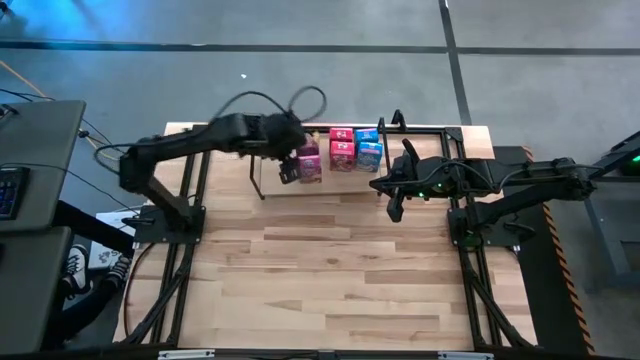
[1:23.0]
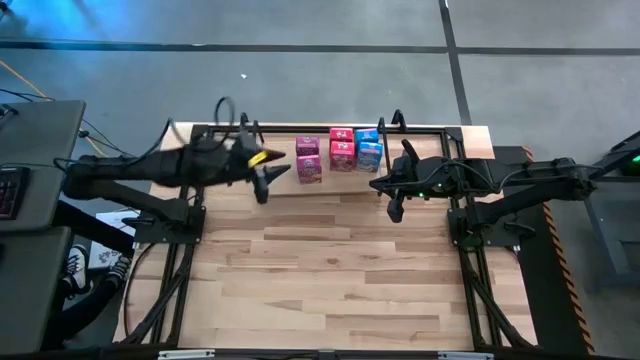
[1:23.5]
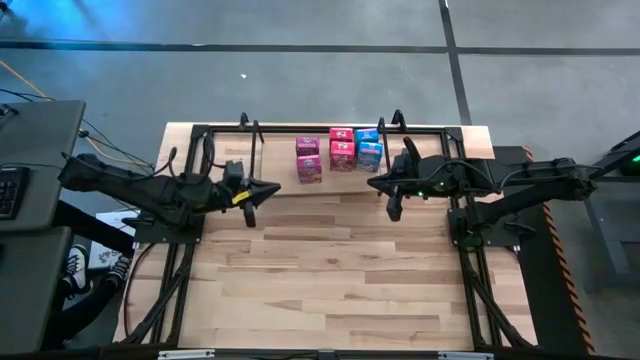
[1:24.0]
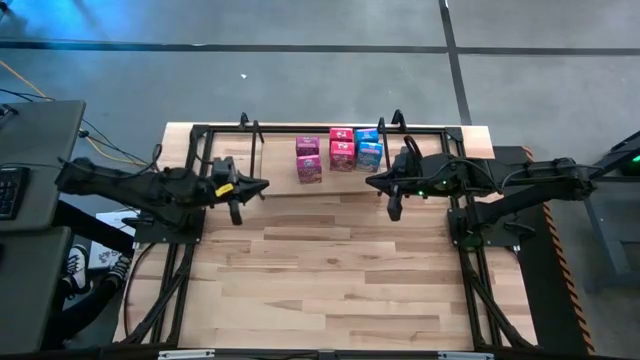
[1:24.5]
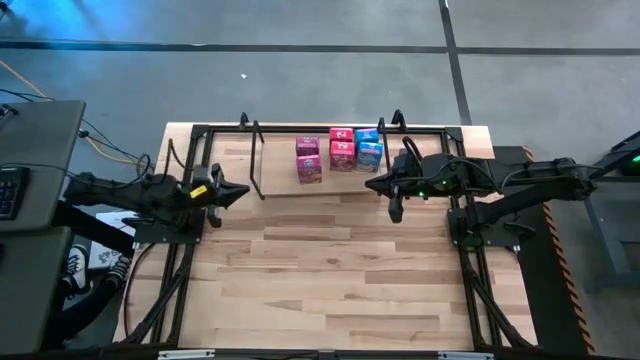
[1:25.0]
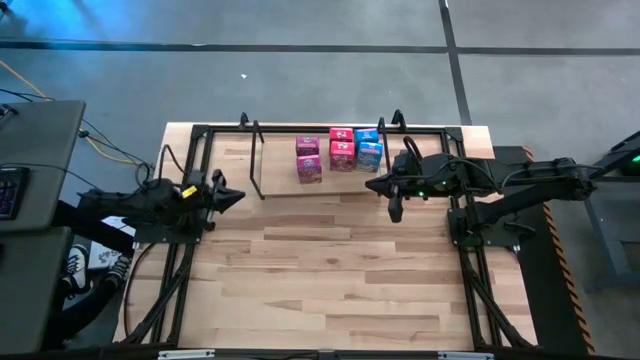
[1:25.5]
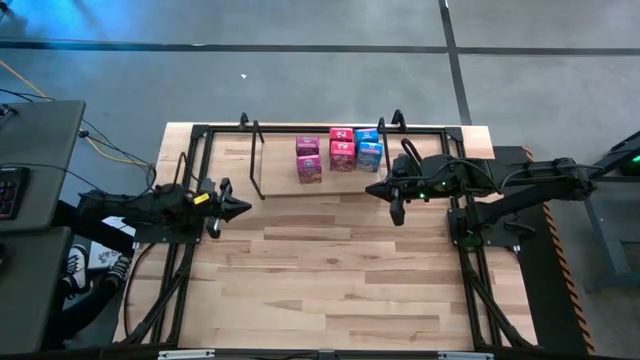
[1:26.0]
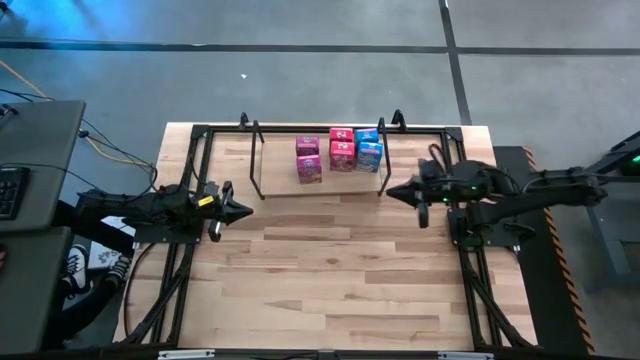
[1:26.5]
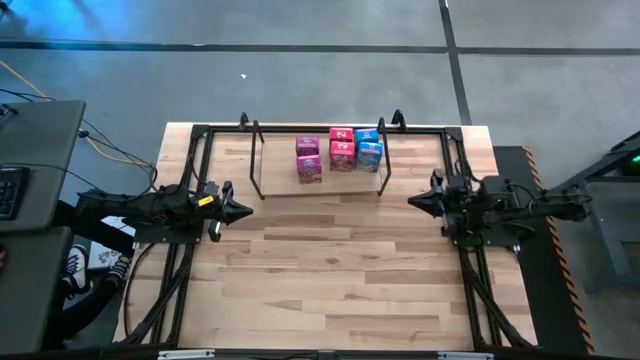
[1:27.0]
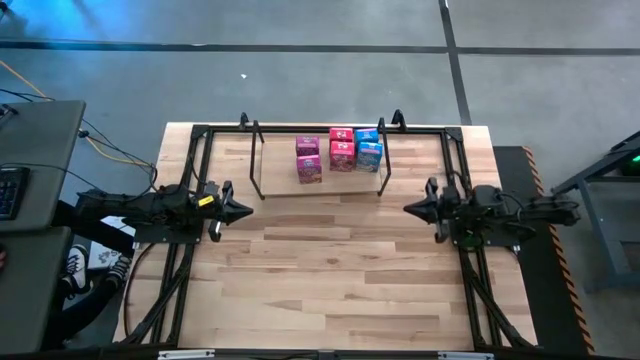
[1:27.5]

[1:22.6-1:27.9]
Task: Stack cereal on shelf
Return to Home Position

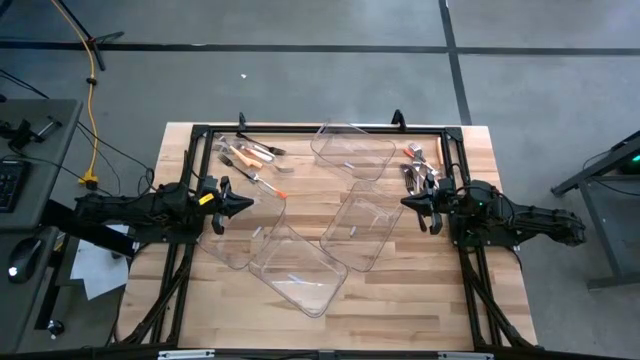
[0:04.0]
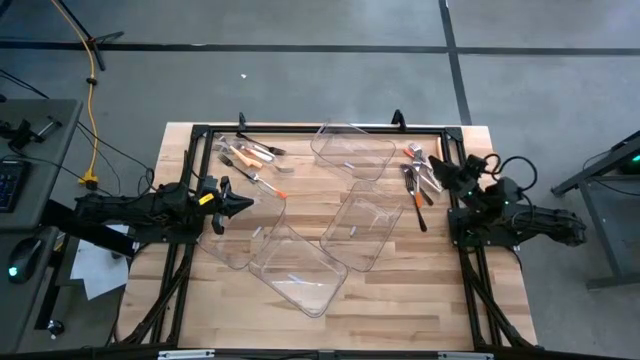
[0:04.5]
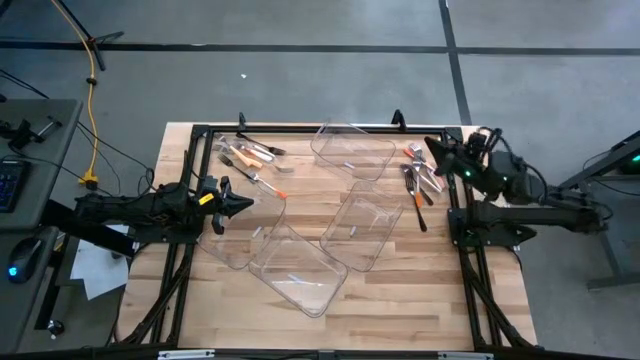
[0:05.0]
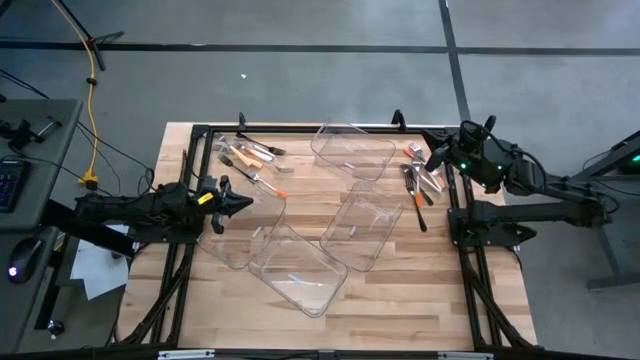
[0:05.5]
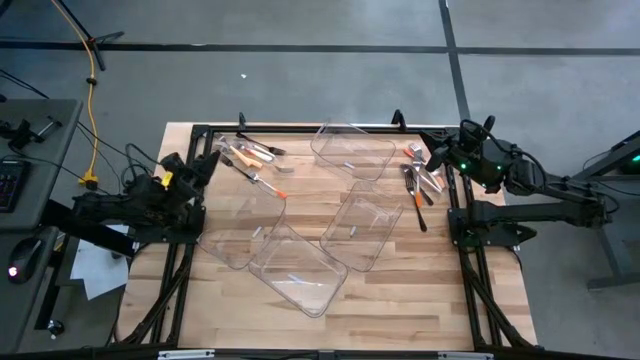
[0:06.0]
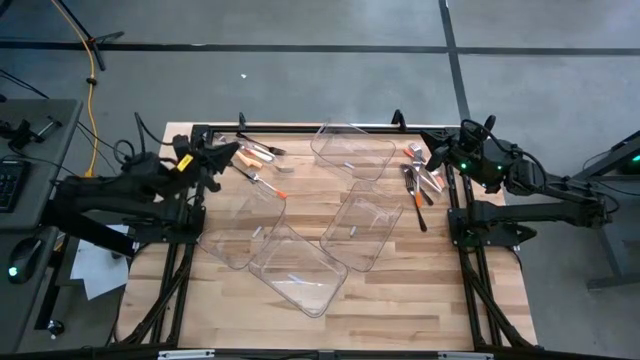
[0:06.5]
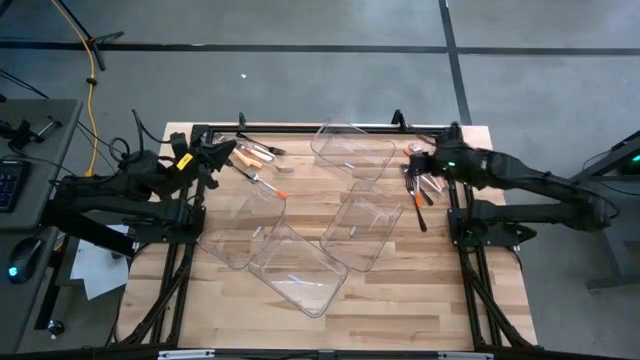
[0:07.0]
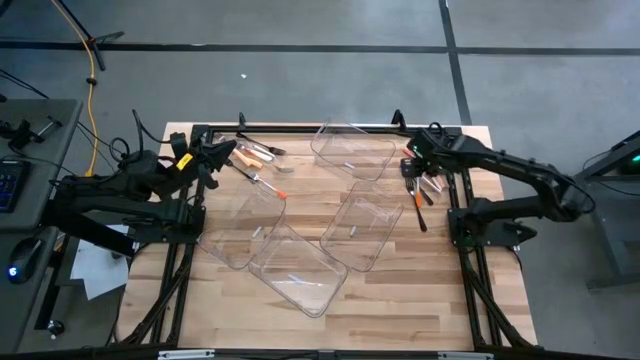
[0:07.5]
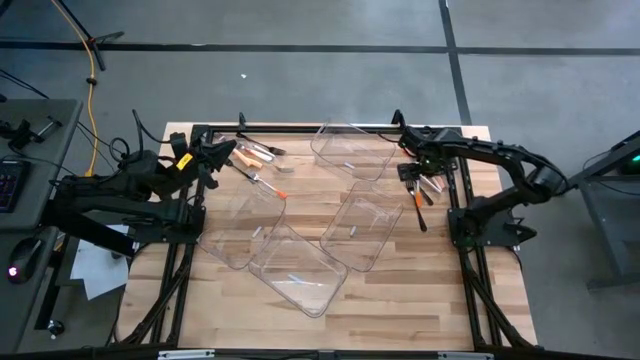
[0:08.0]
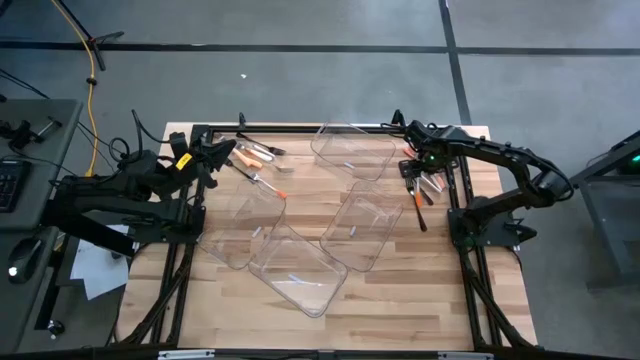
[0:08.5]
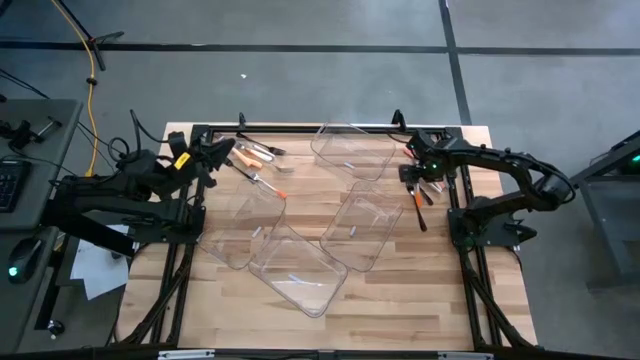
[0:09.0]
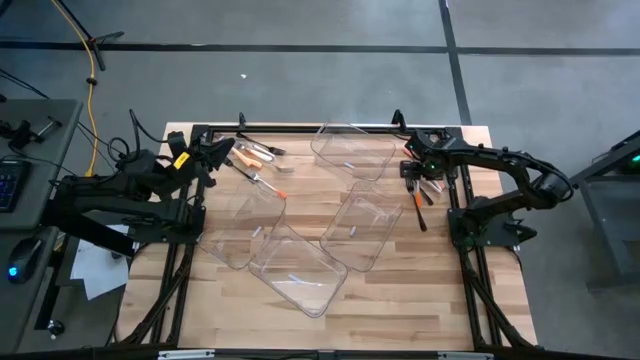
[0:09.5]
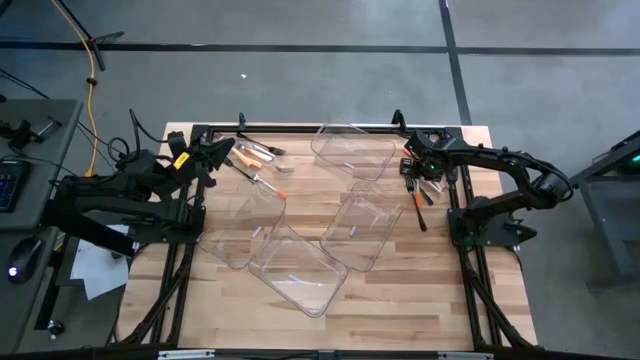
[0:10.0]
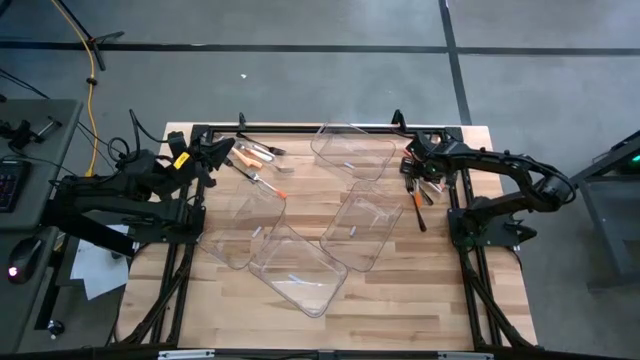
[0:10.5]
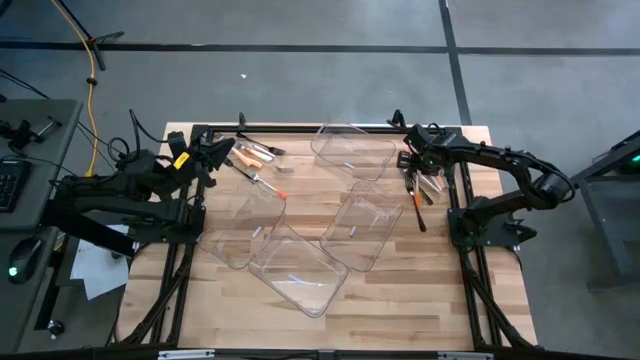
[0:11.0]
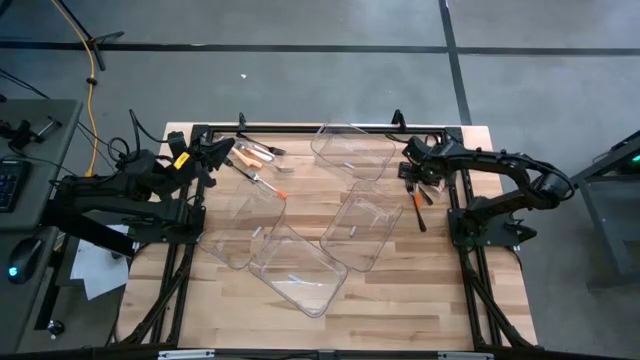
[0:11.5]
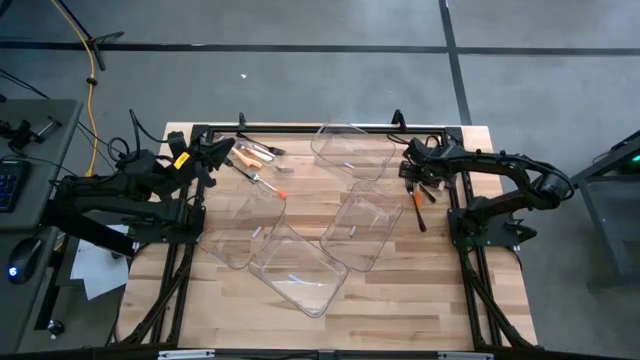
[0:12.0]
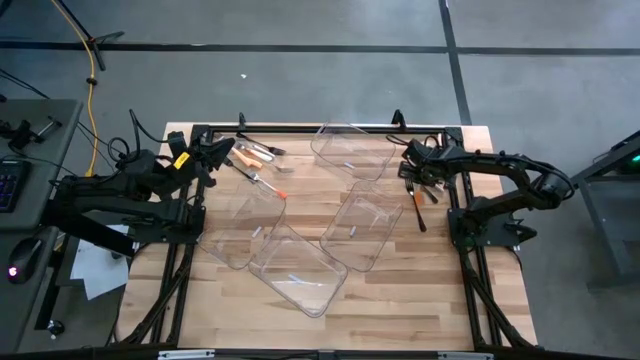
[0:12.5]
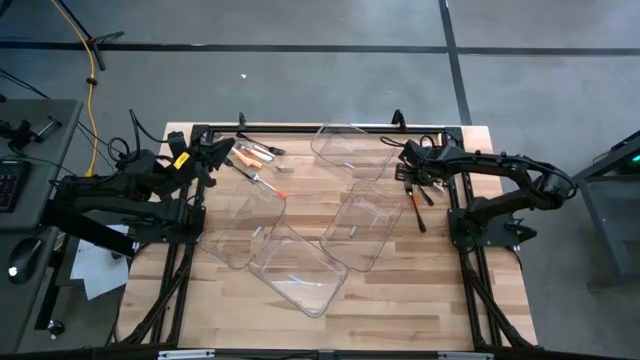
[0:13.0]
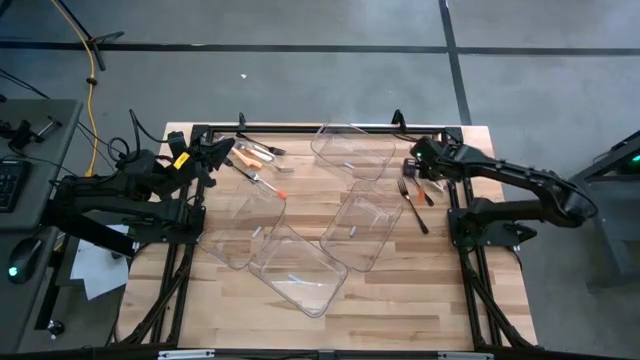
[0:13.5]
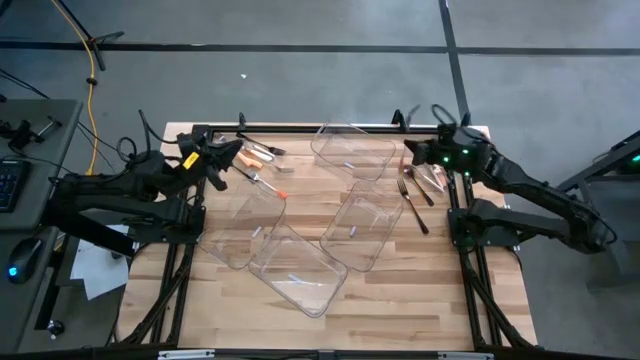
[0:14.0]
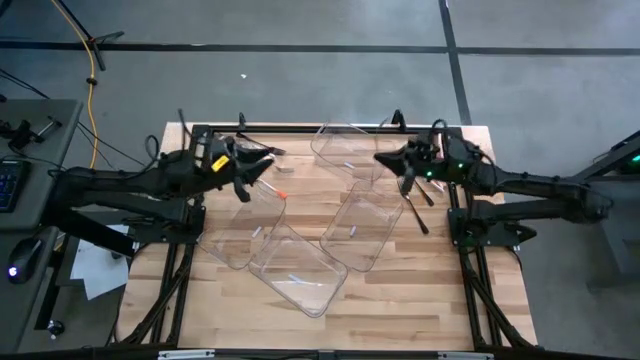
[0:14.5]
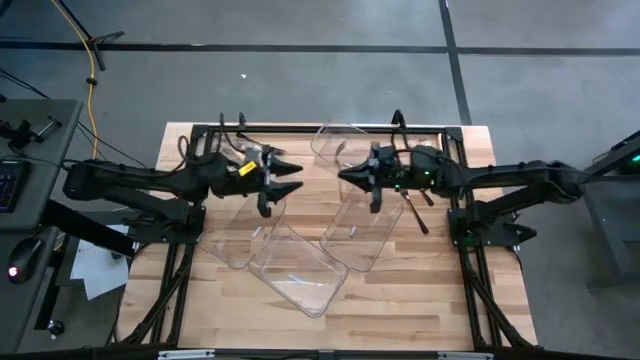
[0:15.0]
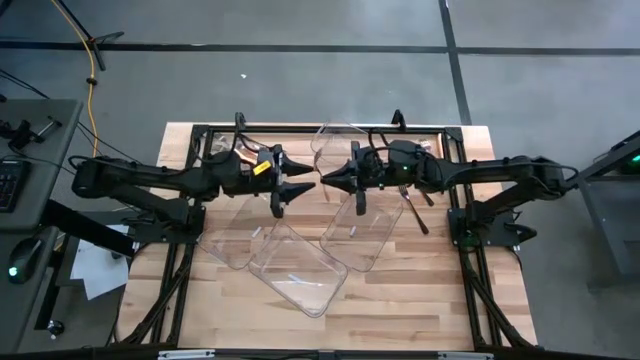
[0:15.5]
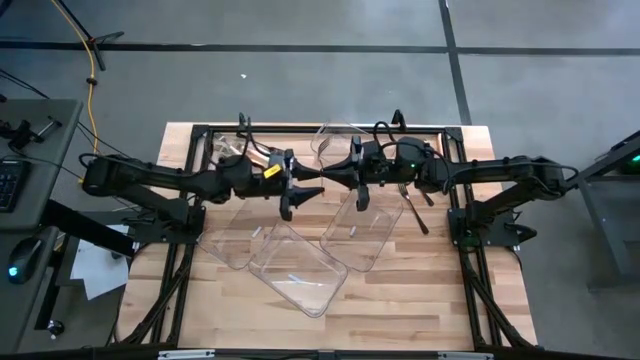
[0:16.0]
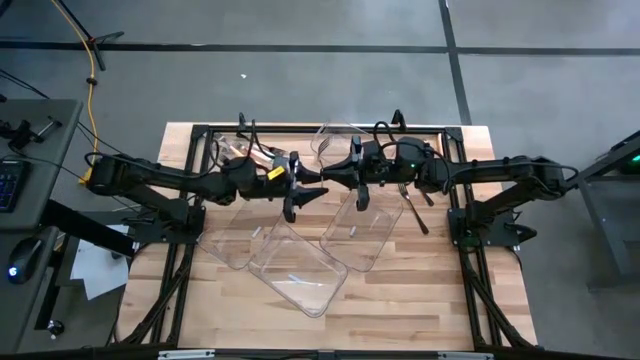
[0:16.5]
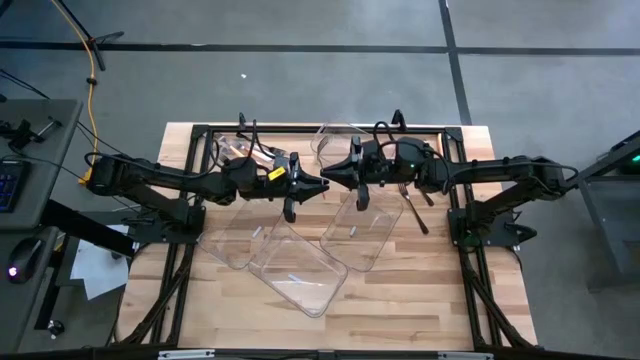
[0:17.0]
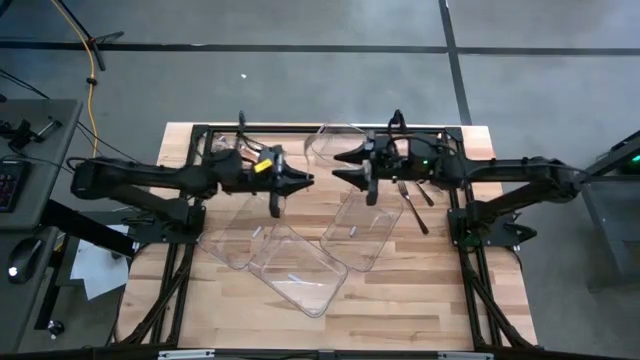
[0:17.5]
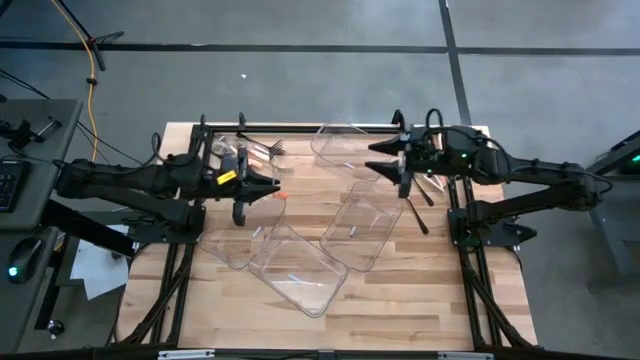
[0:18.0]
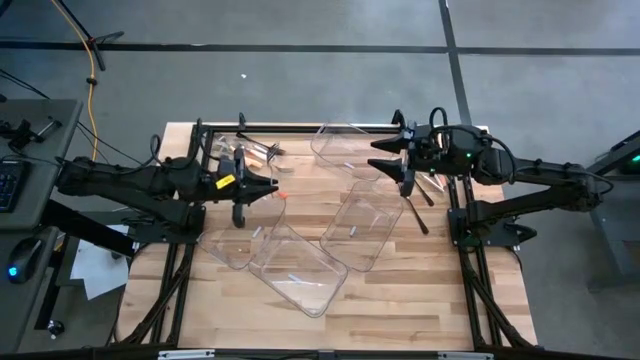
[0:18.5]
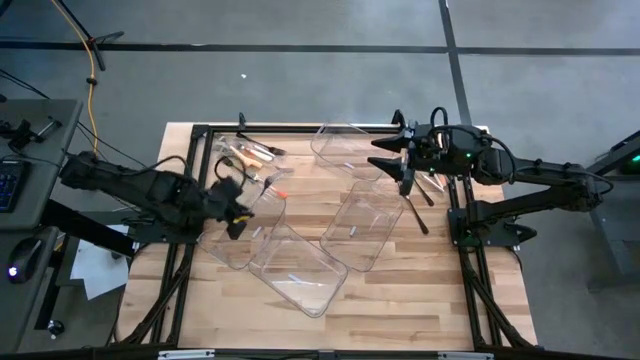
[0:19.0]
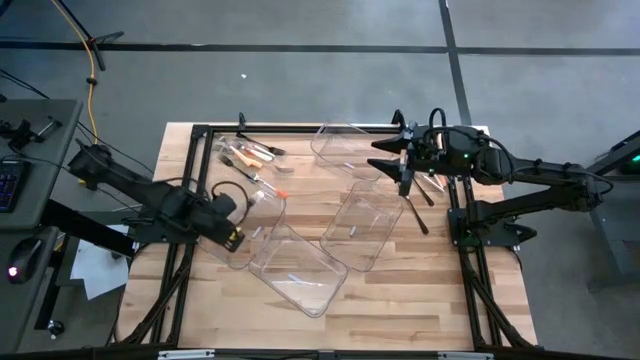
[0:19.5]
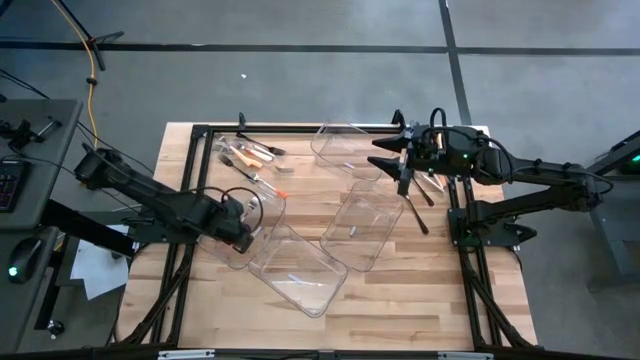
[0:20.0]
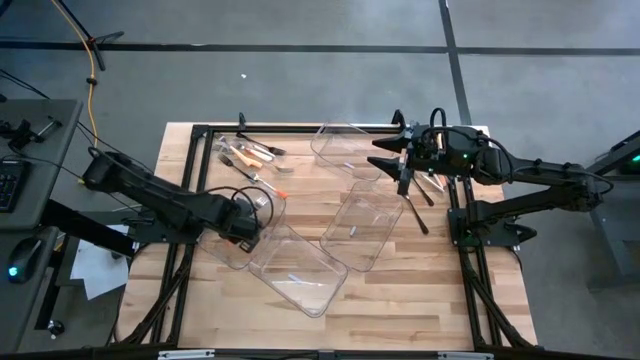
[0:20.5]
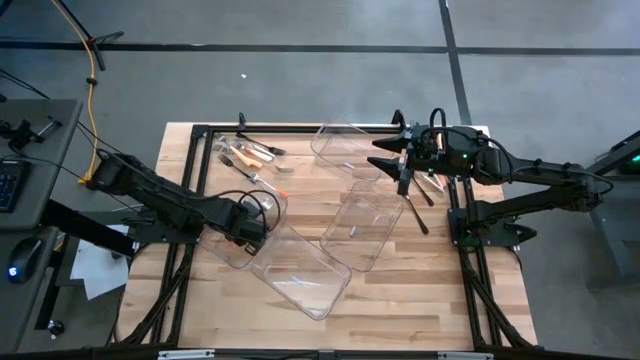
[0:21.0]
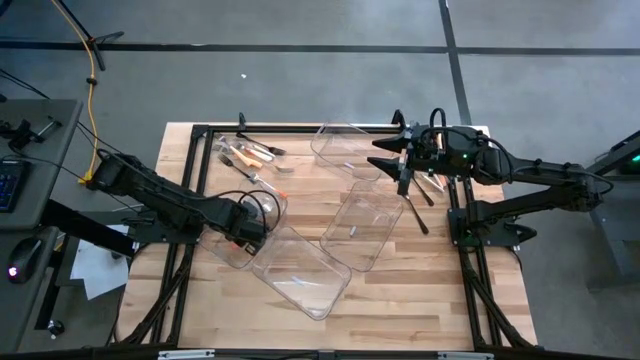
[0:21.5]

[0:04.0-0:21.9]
Task: Sort silverware by color (type)
Put the orange fork into the middle left transparent bin
